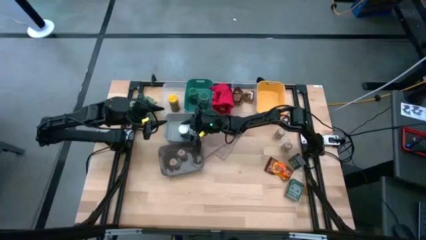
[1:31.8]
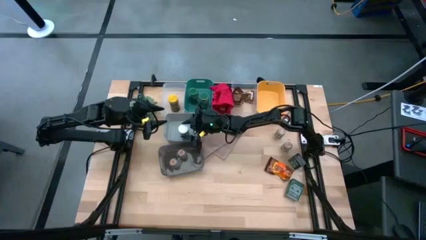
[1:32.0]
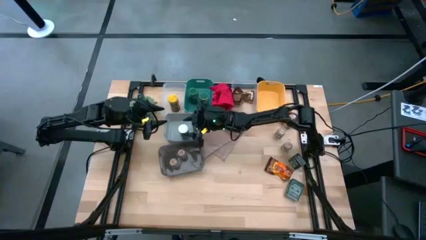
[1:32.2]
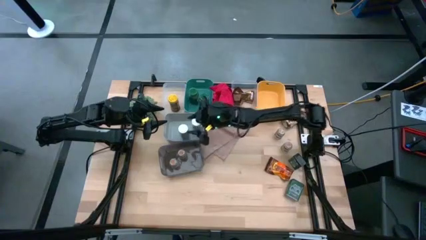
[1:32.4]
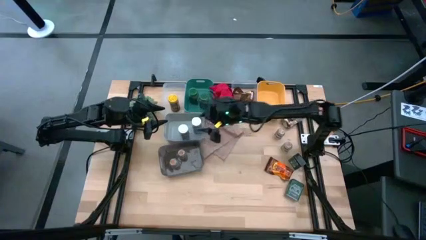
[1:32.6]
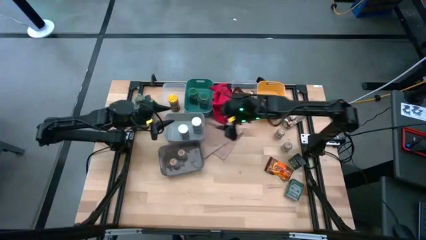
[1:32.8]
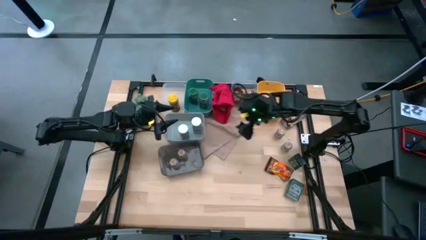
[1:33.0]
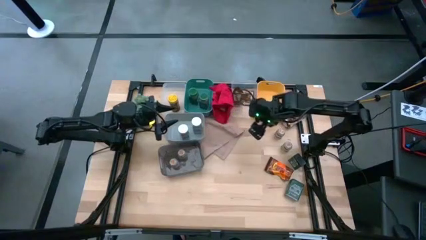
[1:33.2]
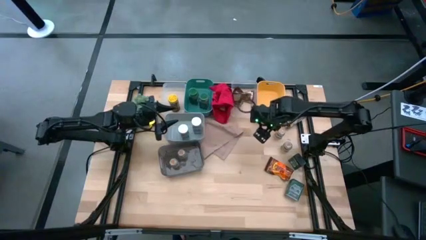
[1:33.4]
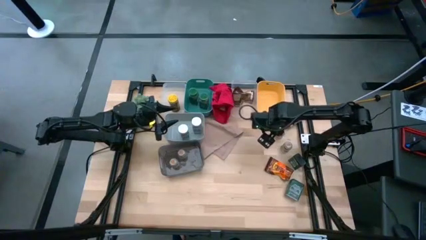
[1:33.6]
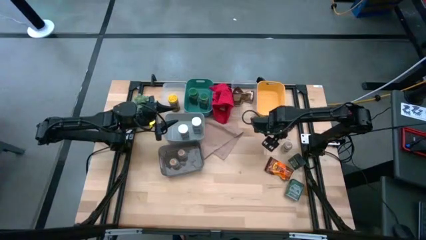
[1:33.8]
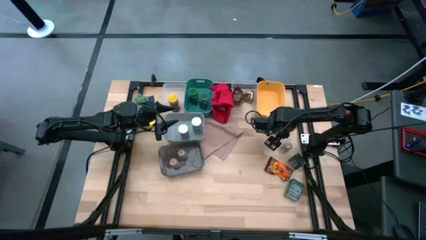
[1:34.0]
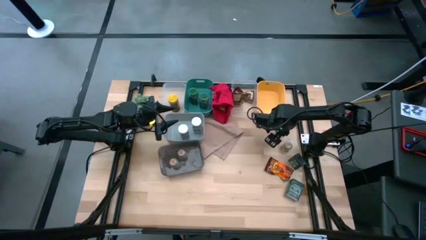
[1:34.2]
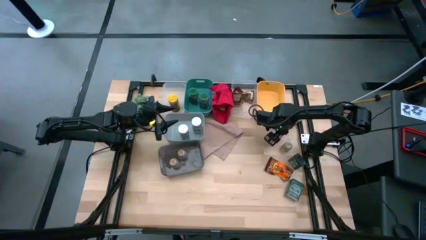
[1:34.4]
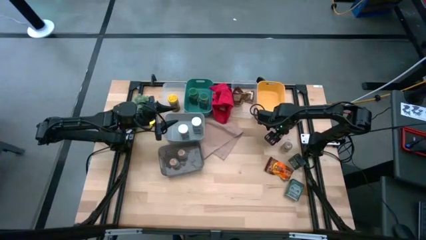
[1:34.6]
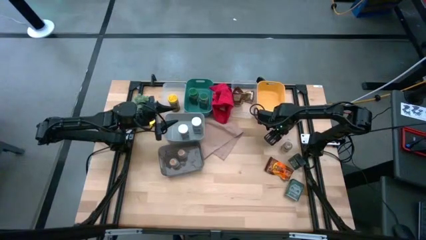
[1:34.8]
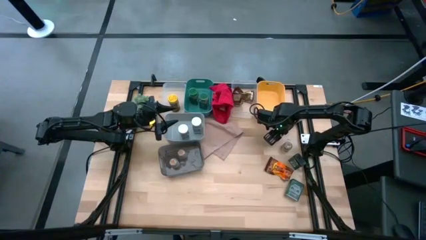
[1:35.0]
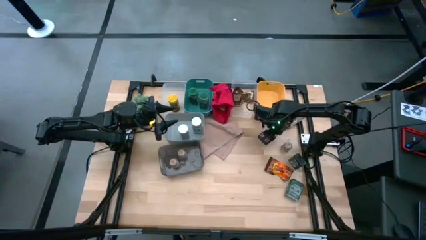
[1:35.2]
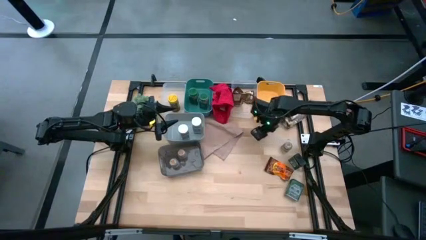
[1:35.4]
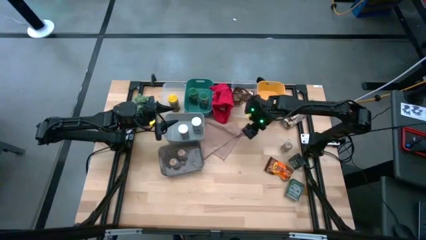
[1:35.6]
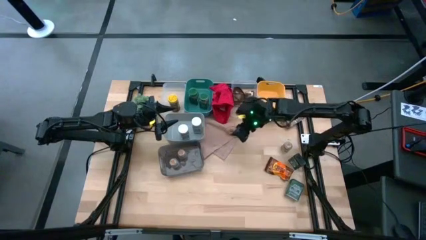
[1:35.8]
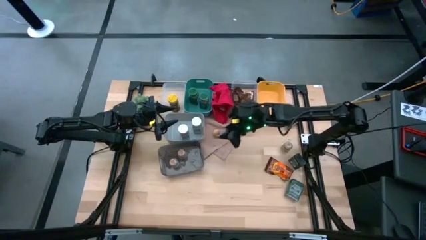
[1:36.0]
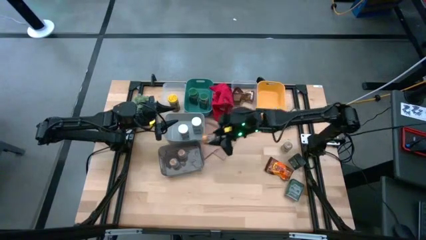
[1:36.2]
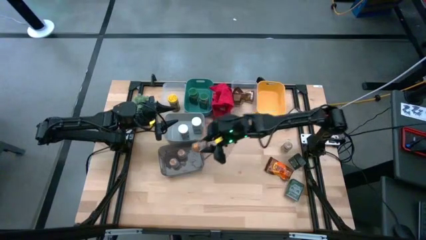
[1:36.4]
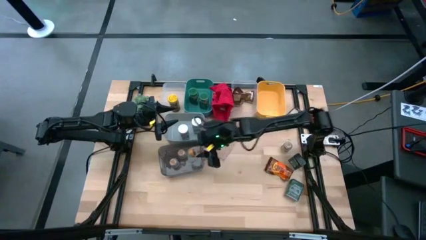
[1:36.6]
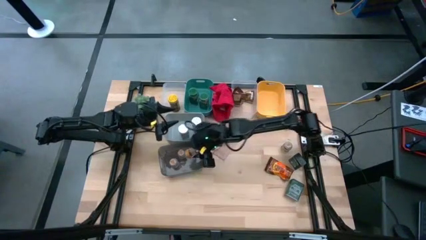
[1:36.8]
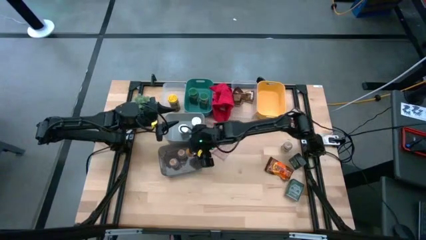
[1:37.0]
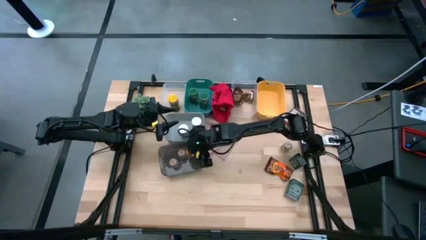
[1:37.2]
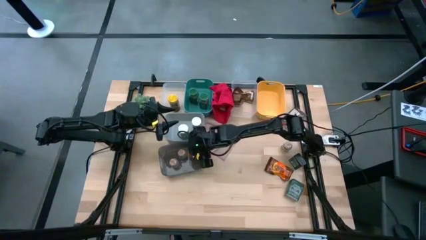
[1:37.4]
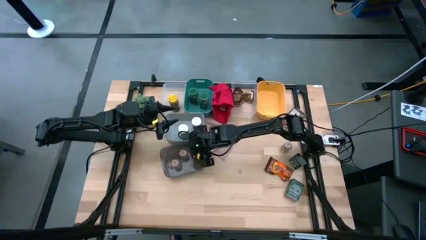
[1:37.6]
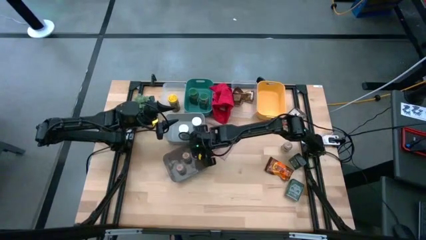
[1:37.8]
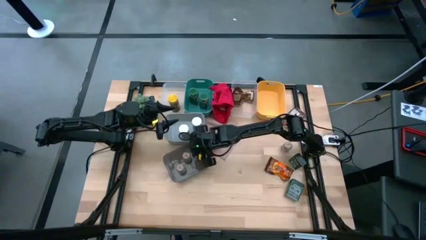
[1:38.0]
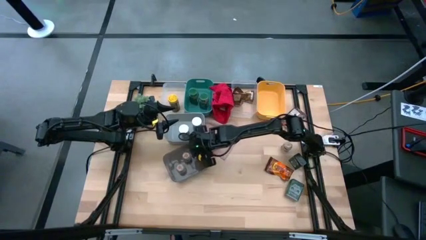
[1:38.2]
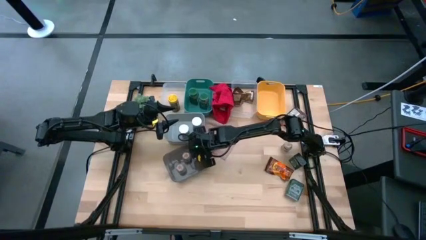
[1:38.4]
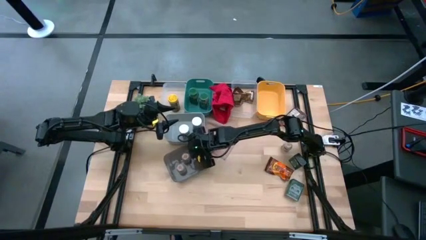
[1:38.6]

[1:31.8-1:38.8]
Task: Sort spices by type
Put the brown seasoning bottle into the black bin

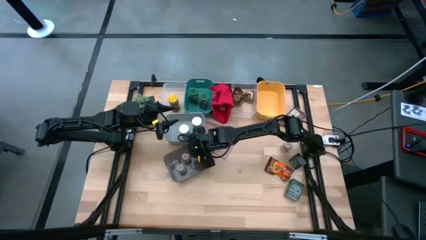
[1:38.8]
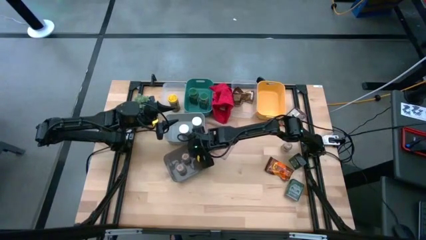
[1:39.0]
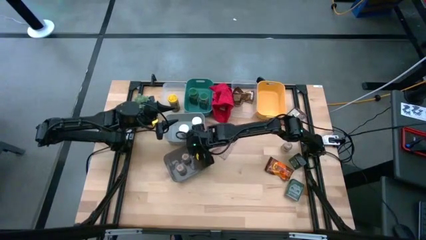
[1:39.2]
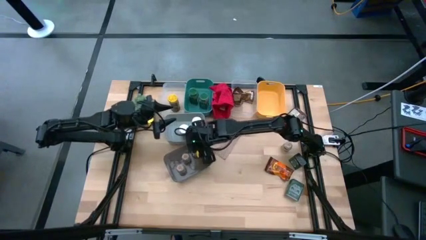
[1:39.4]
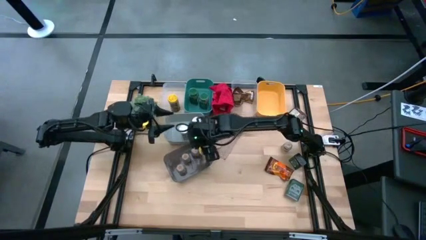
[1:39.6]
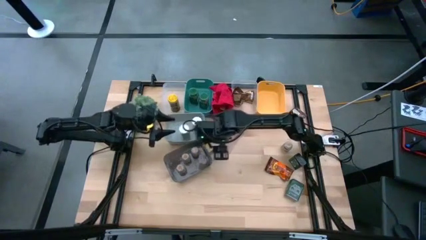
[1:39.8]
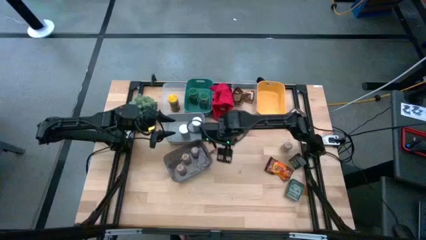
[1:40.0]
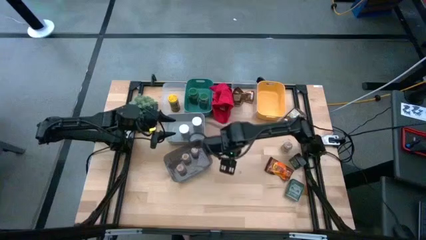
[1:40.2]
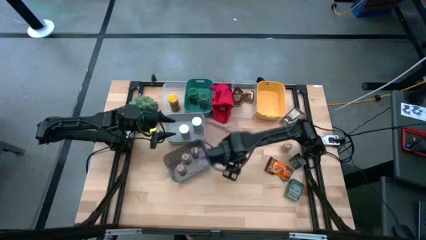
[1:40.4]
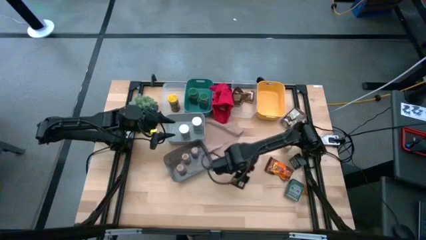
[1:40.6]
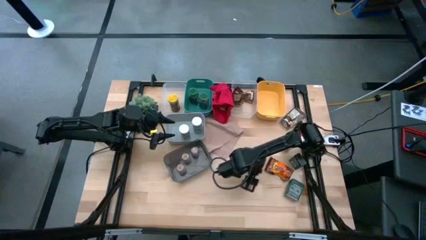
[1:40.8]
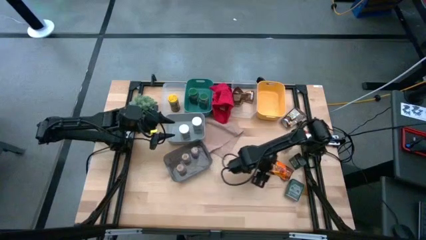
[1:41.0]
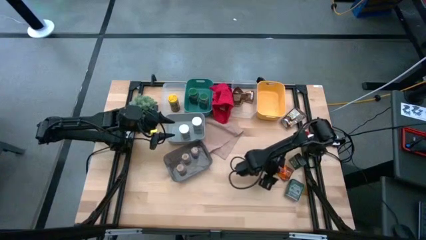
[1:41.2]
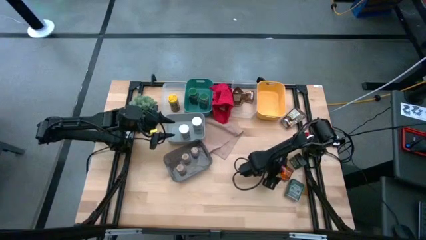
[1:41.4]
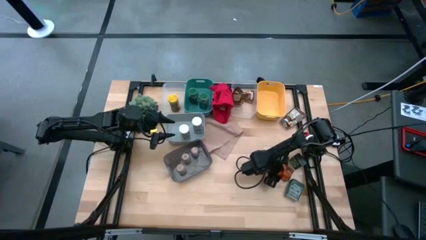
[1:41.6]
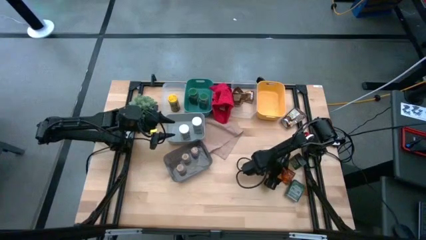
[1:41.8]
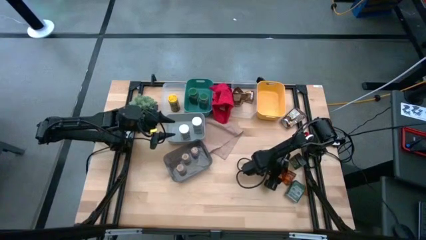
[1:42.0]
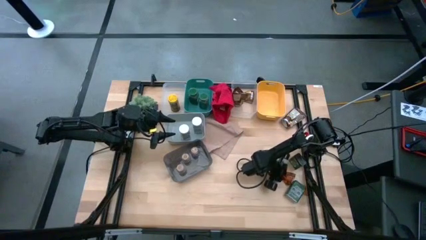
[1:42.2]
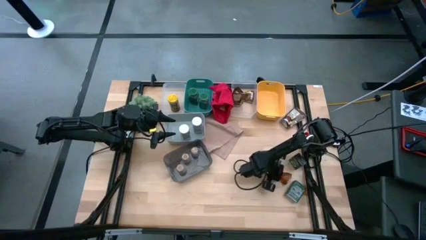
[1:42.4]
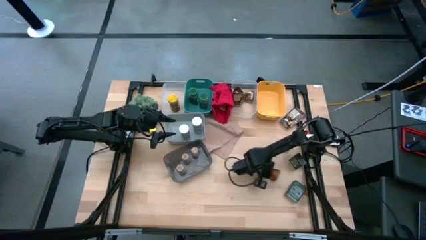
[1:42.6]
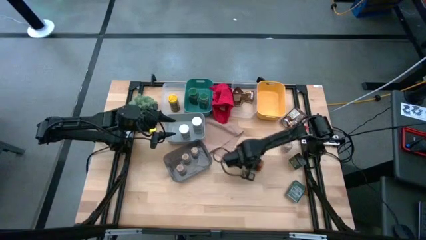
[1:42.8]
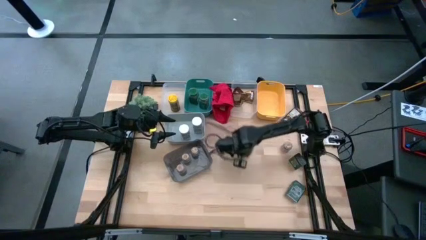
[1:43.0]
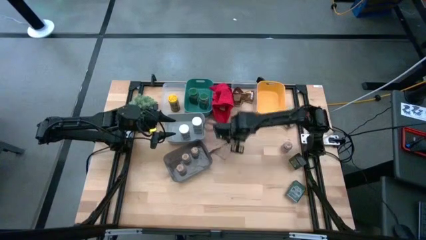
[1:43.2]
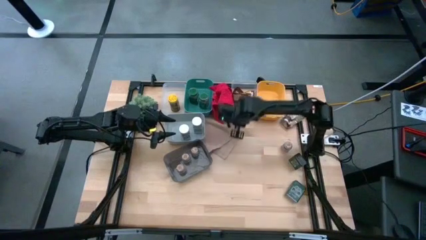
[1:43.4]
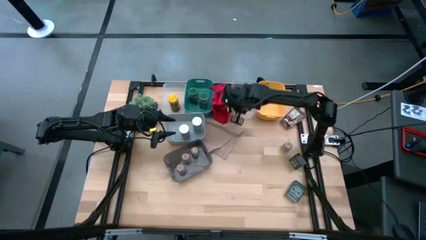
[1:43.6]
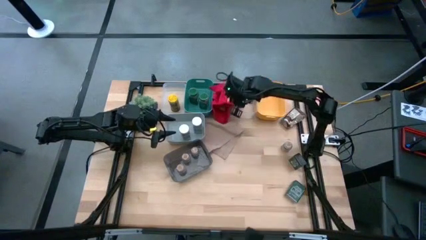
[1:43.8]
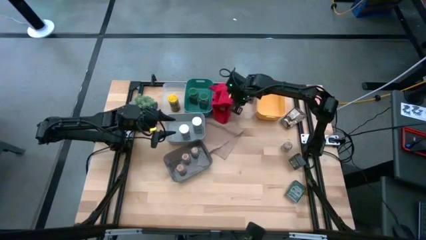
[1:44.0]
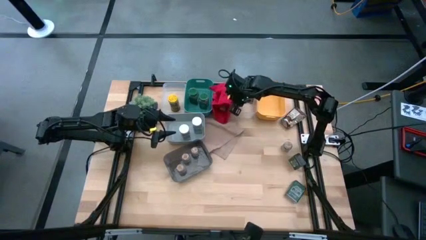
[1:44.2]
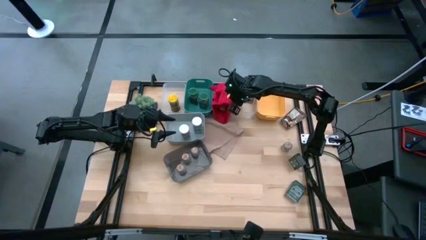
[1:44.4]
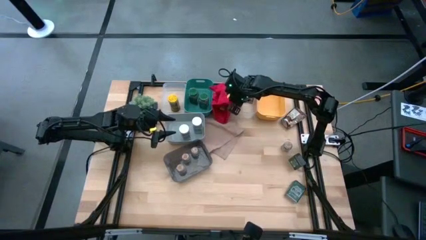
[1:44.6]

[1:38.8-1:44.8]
Put the orange seasoning pack into the right transparent bin
